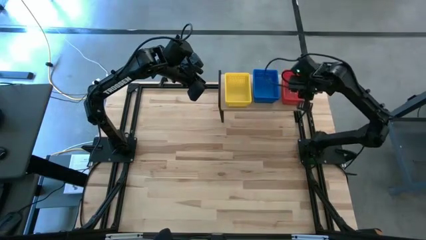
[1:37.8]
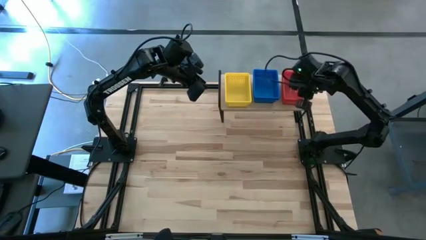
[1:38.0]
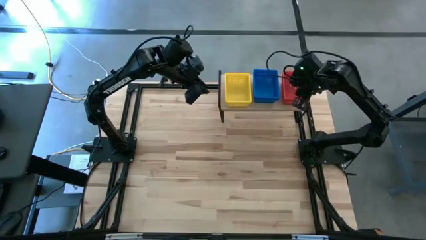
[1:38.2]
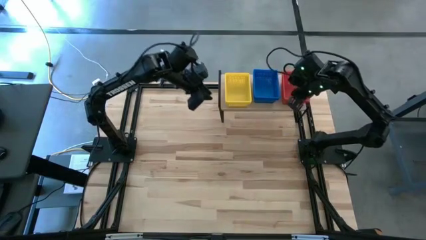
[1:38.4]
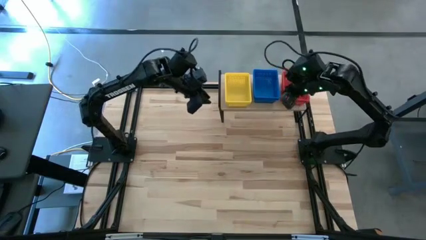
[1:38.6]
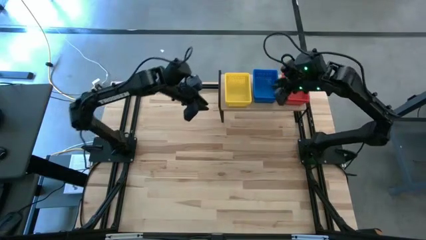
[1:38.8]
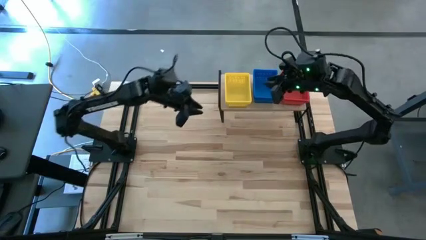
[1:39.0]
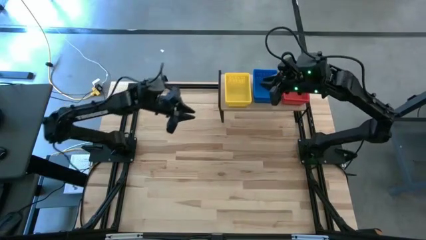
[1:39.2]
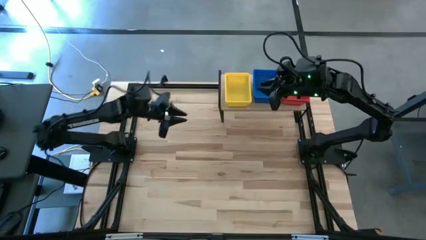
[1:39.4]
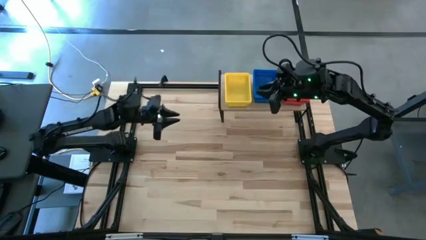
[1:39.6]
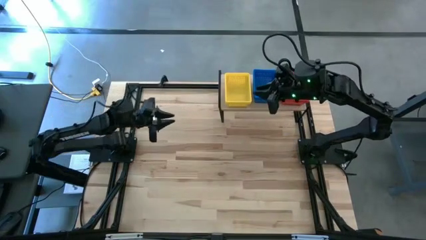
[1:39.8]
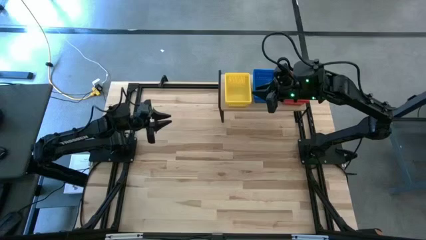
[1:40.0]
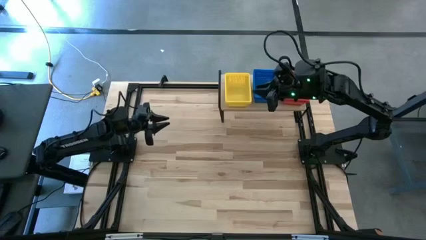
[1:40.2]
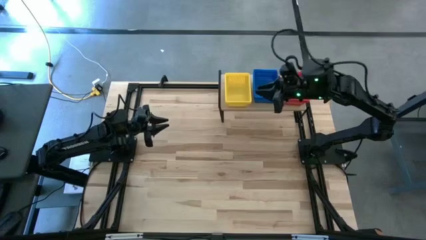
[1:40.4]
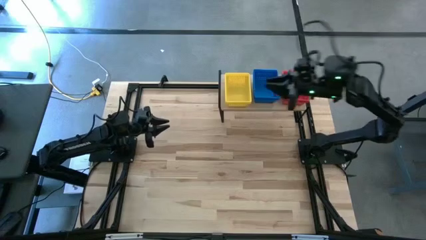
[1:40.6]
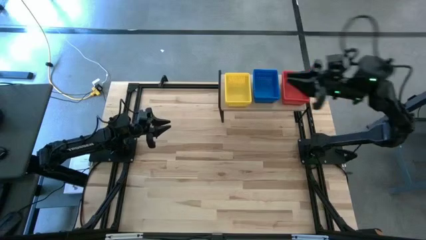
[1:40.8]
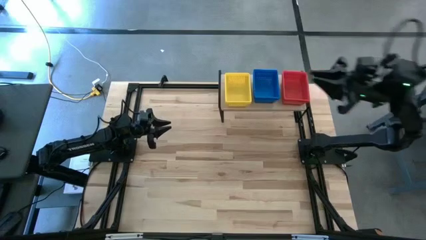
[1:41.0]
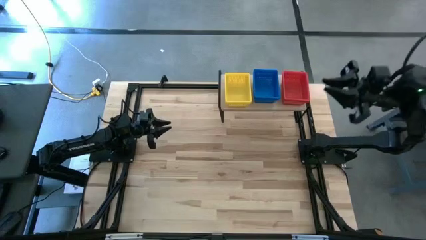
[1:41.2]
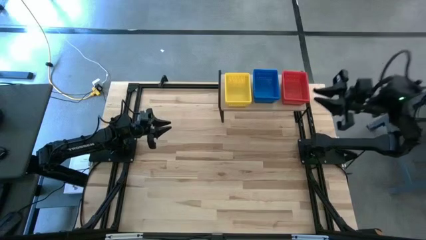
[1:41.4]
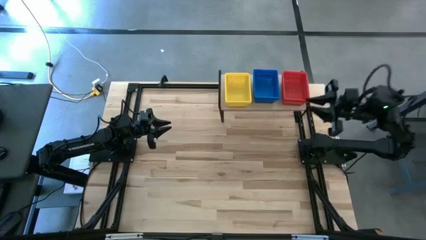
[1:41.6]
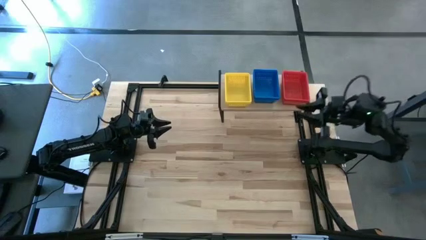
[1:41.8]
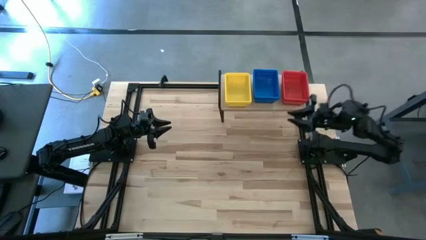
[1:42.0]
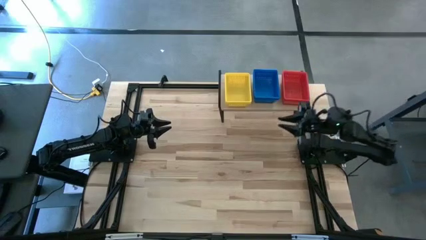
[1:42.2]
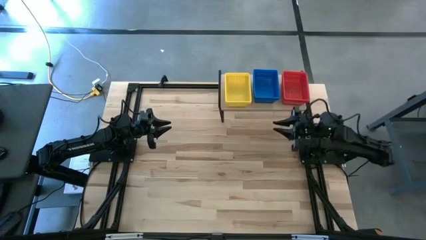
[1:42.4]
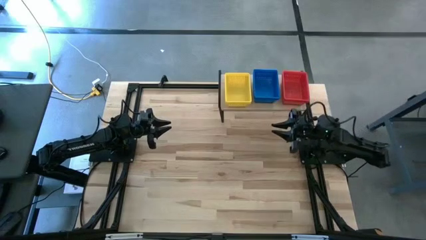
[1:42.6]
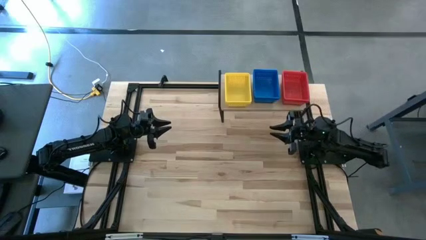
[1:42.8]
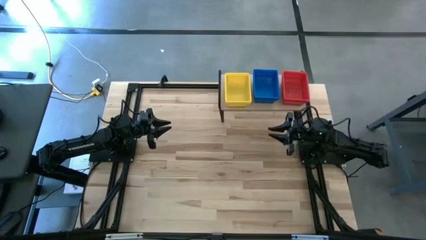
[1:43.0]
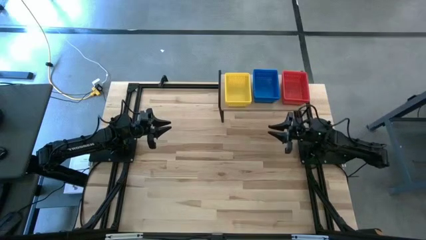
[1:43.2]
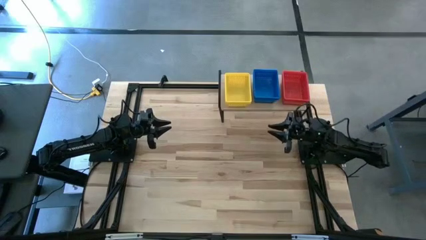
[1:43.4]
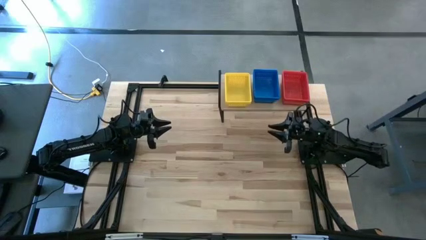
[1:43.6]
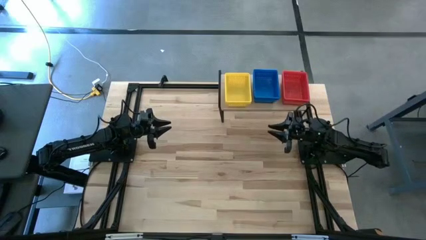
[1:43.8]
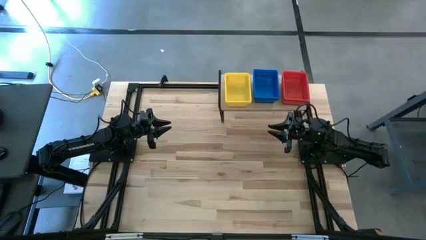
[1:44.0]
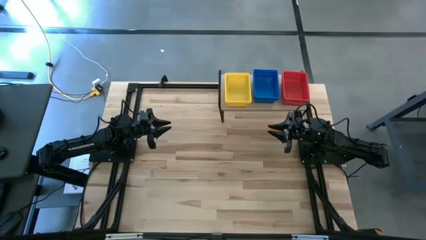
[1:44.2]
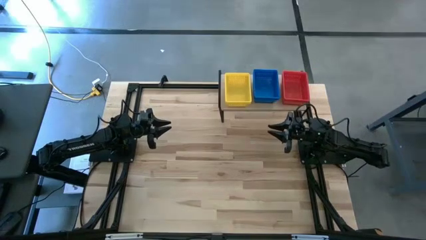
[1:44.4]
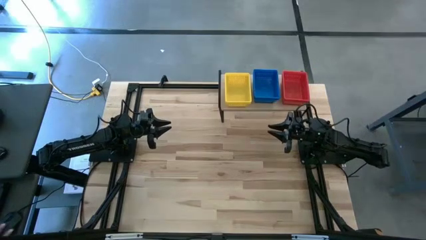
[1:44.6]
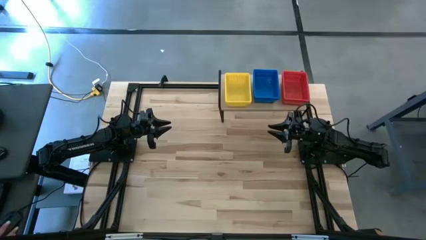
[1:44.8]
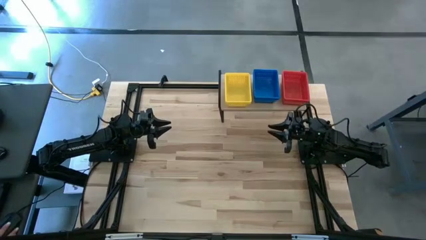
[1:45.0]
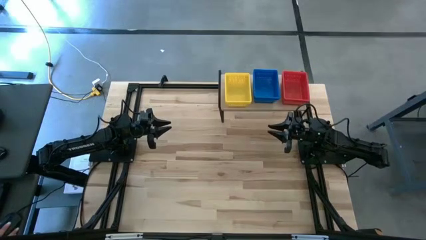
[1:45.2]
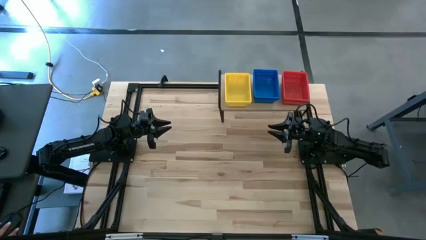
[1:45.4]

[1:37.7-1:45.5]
Task: Stack baskets on shelf by color
Return to Home Position

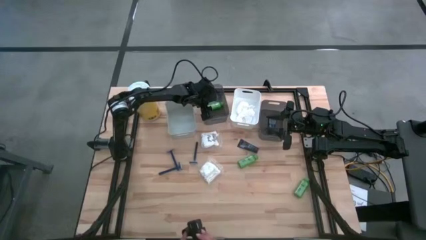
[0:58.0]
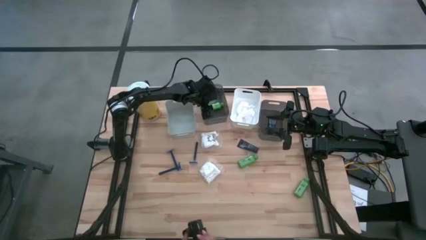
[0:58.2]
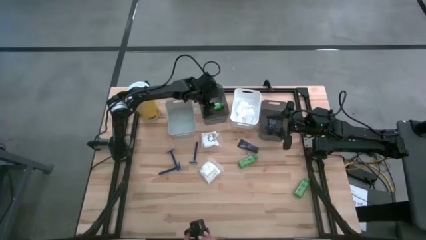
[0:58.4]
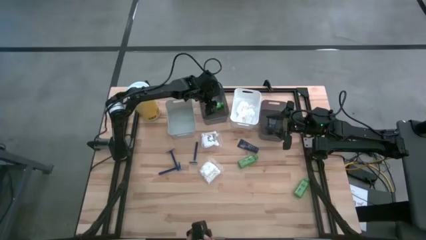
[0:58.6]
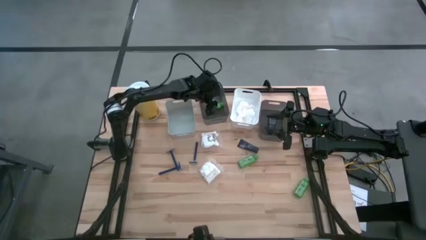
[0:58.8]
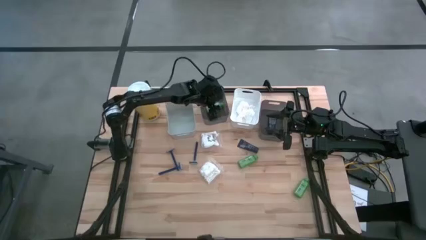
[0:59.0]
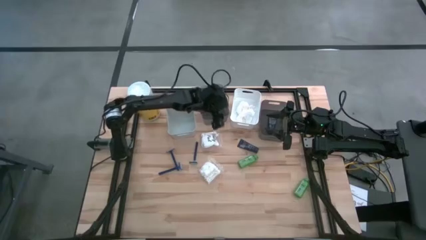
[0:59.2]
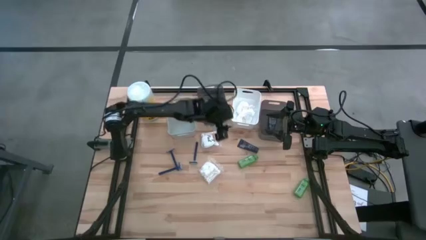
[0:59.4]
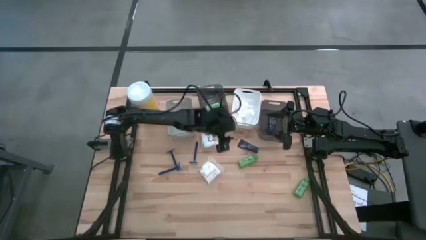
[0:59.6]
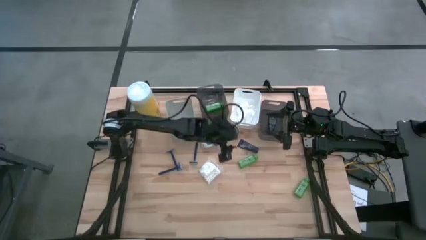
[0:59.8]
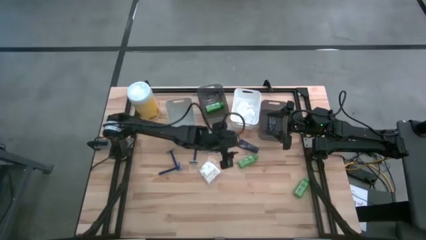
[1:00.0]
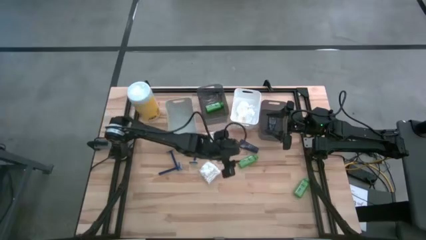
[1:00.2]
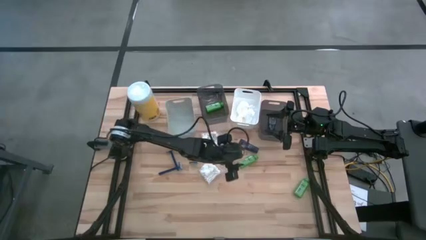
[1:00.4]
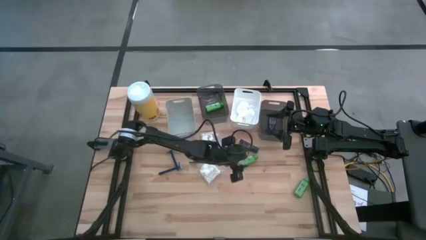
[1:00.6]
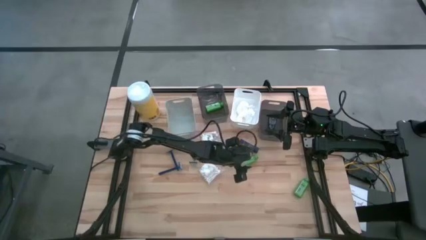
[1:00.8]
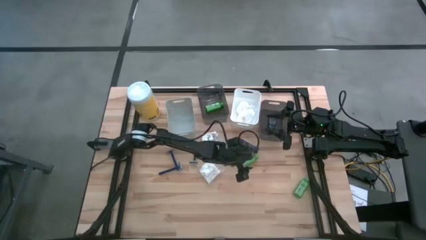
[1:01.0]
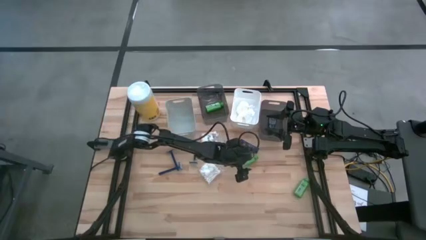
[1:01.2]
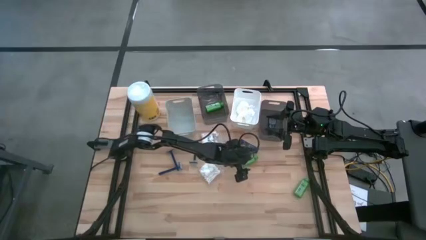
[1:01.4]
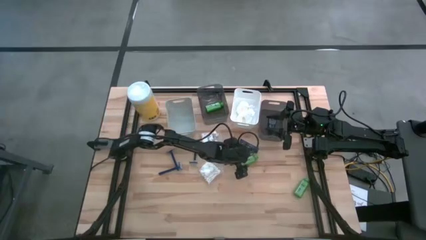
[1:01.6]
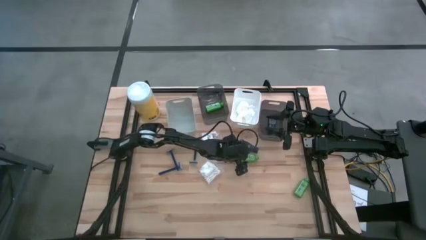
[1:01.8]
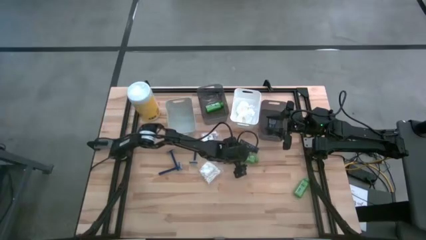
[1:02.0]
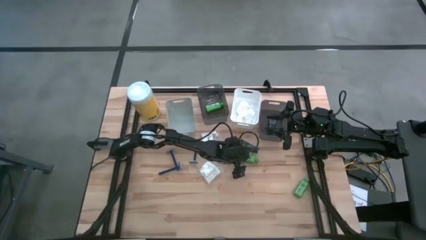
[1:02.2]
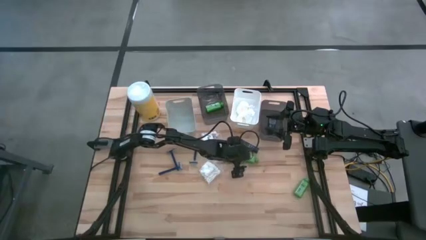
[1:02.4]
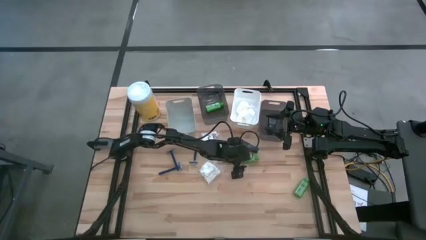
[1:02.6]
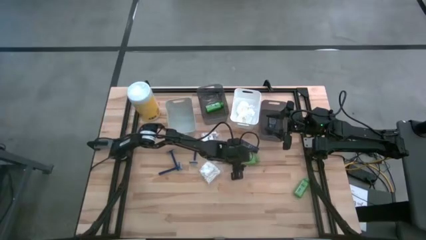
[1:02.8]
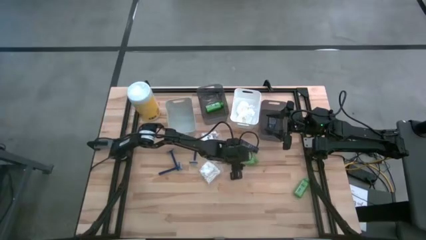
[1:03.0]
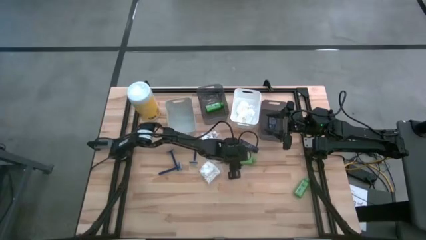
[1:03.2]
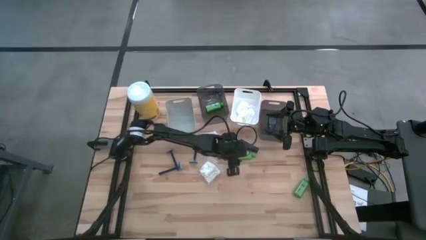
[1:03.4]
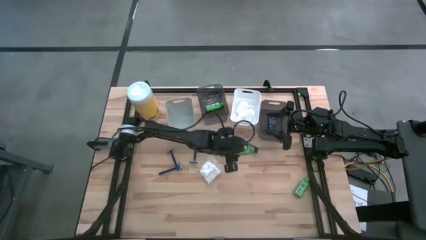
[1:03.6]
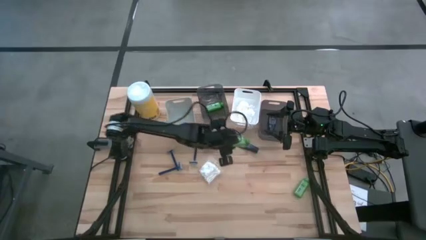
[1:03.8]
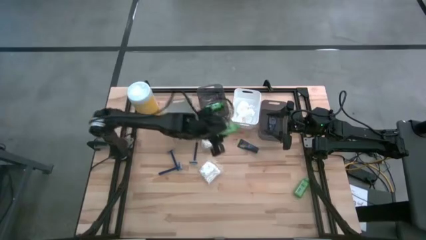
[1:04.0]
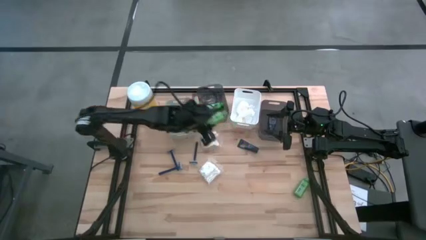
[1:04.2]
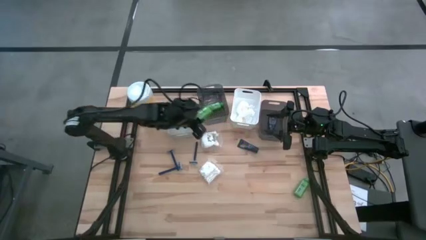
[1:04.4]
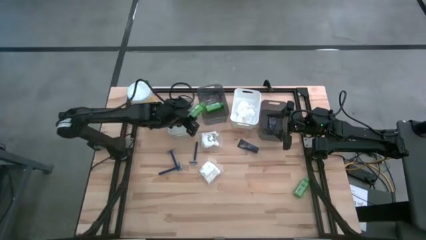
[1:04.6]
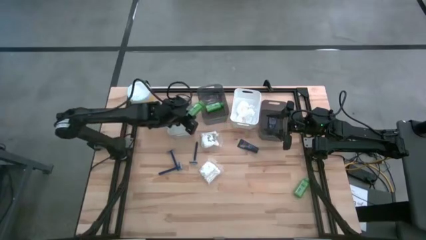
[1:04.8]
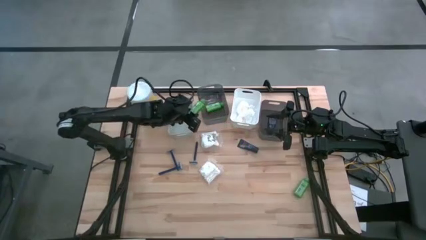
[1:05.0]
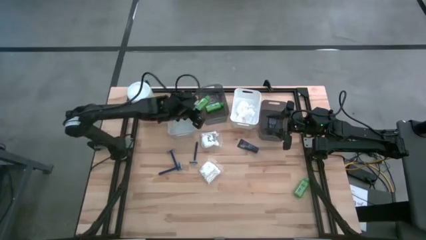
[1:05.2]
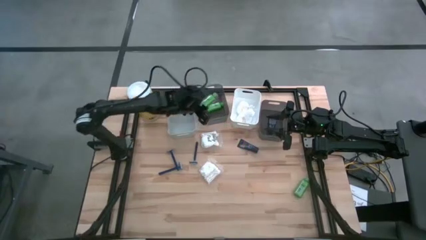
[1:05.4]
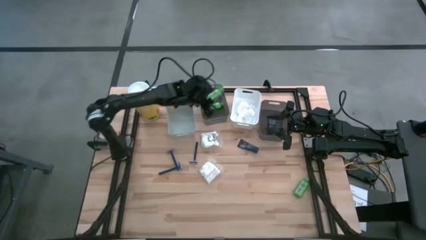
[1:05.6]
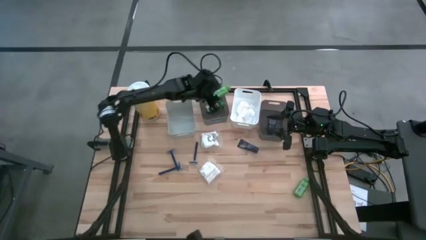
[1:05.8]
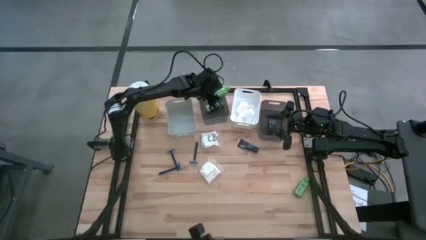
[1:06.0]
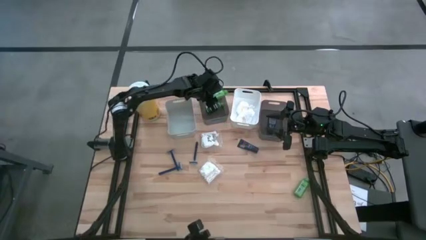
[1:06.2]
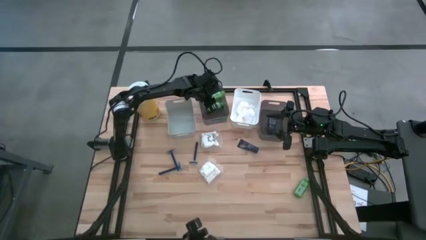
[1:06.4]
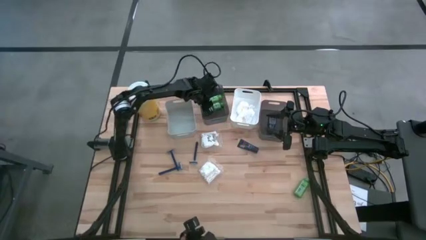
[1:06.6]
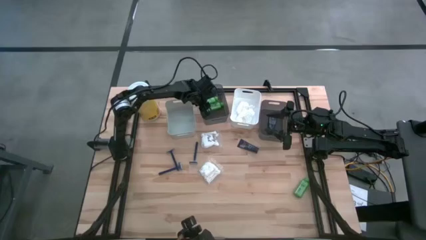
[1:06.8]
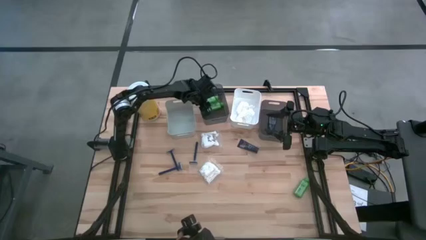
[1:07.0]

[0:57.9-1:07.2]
Task: Pick & Place Travel size toiletries
Put the green shampoo into the left black bin
